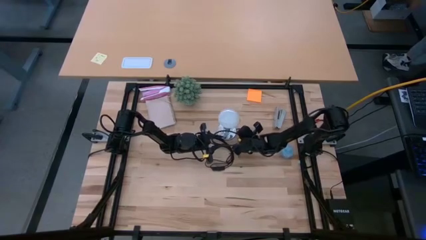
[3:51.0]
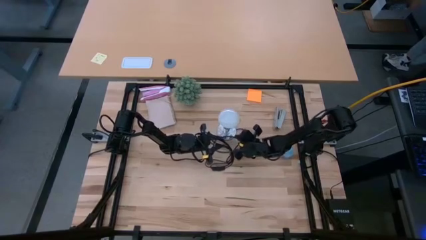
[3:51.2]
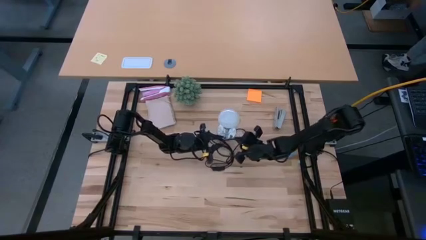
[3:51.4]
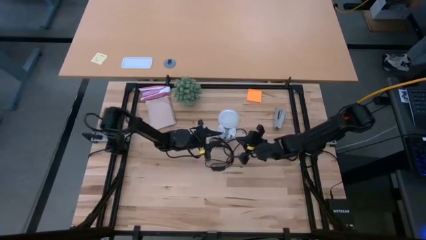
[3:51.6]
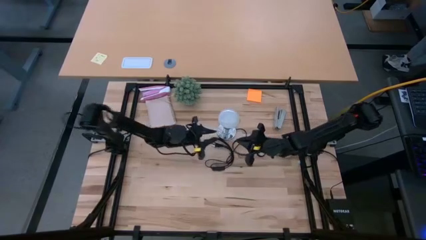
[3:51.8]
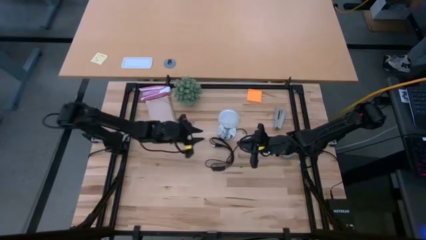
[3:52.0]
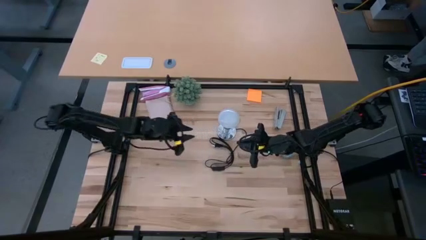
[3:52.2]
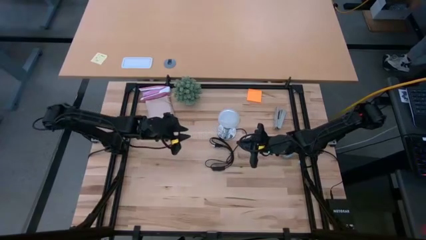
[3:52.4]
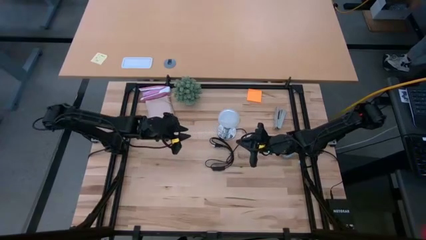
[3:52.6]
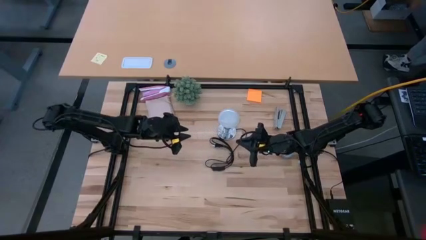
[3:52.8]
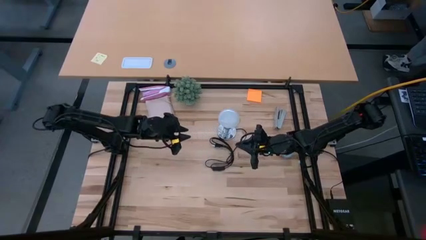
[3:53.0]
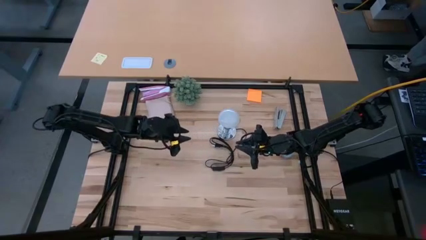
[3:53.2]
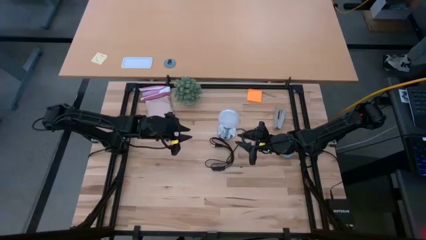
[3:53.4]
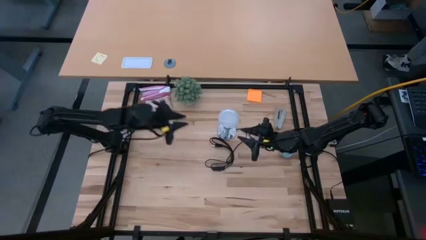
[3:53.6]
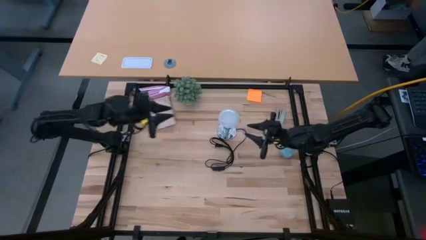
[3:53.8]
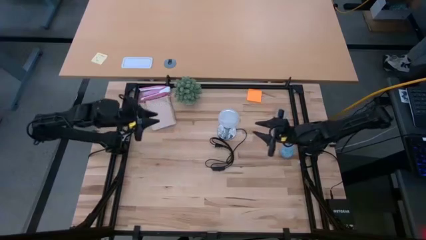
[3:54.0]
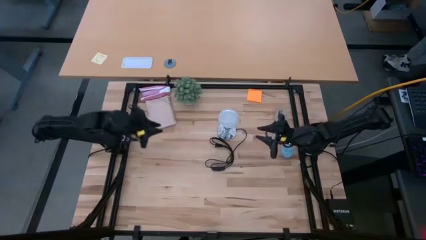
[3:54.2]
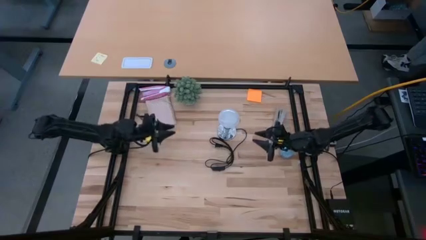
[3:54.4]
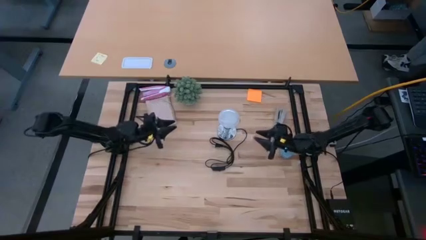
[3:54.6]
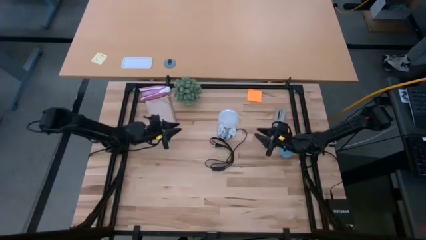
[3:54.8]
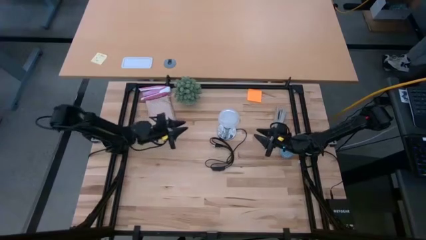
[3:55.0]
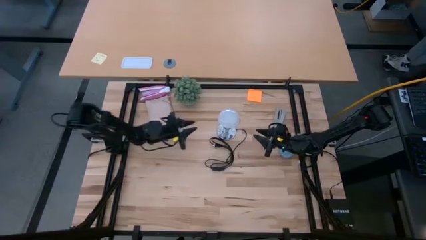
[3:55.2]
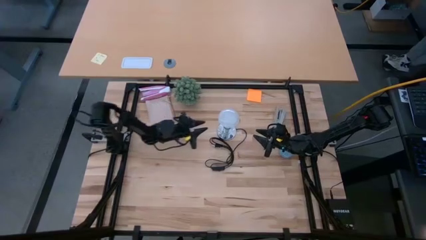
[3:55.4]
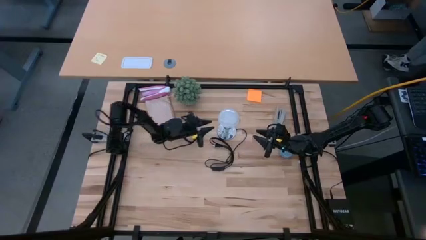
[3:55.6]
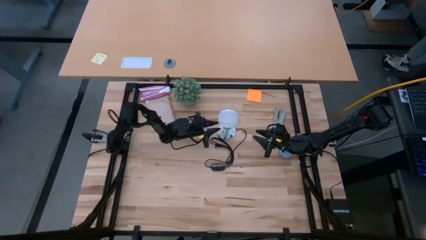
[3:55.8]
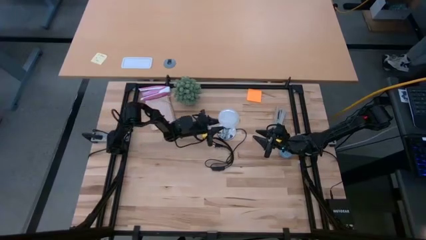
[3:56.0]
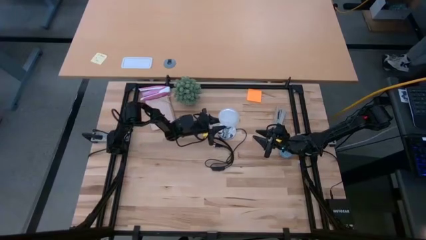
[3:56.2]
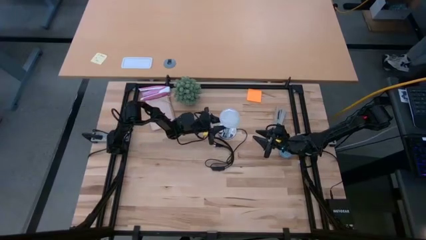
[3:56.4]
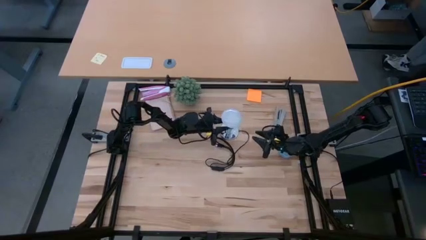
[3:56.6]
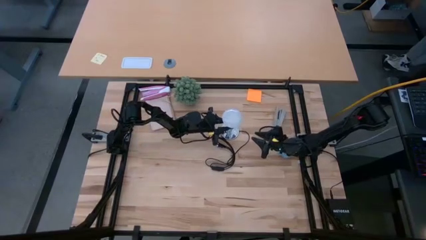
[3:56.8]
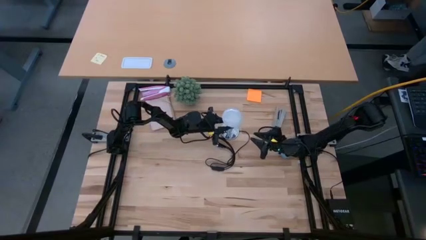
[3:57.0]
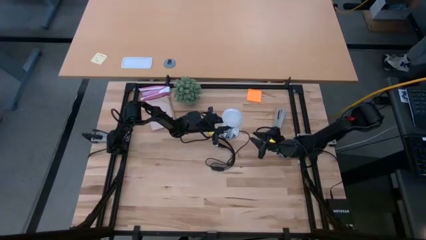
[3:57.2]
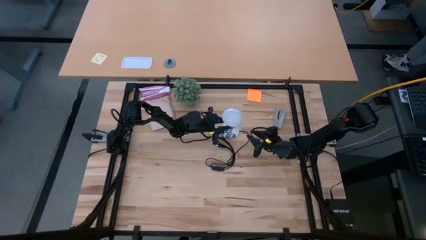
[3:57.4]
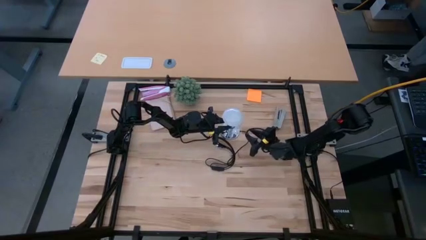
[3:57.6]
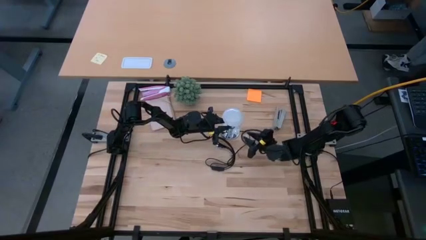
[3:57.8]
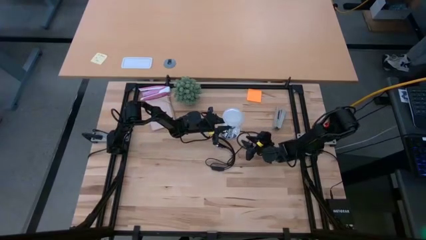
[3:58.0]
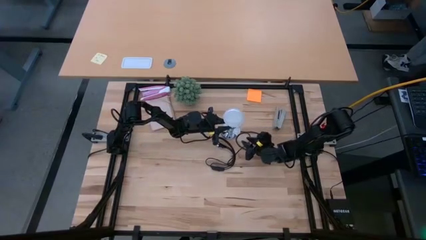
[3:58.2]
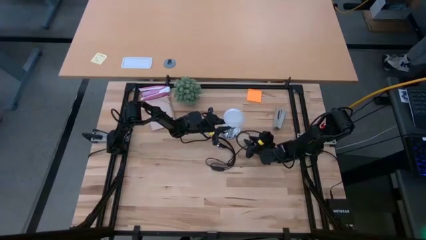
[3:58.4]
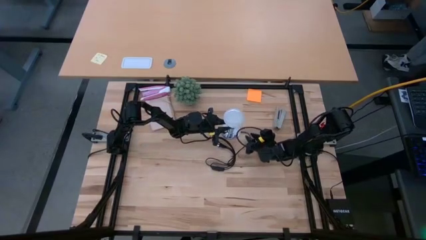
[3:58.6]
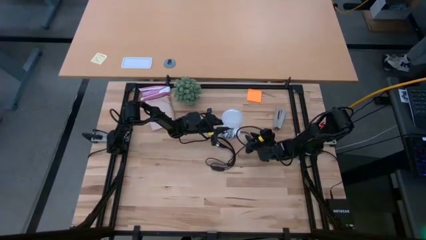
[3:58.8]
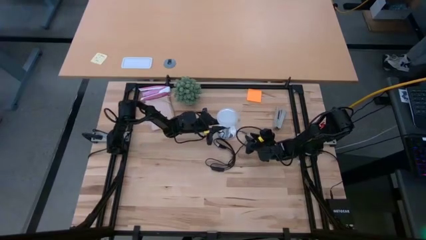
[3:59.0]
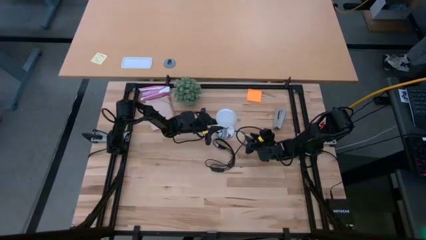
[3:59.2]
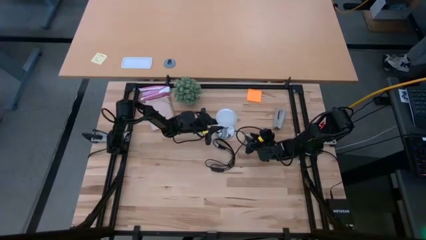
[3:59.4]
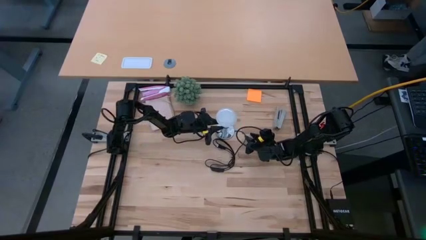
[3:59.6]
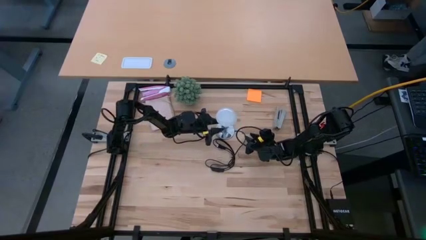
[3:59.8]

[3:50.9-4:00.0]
Task: Screw lightbulb
Remove the lightbulb from the lamp

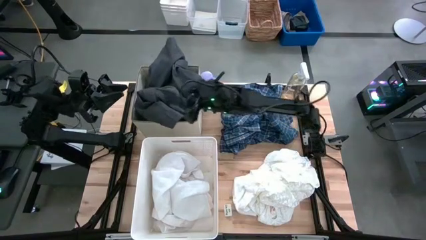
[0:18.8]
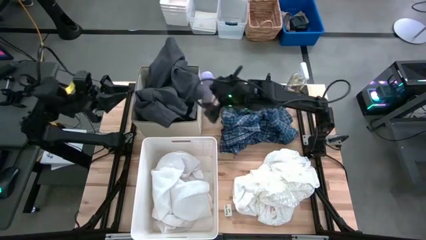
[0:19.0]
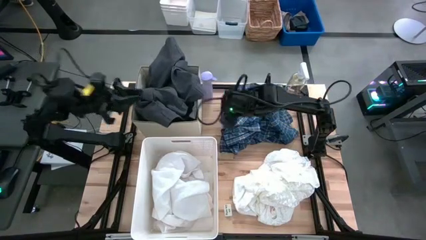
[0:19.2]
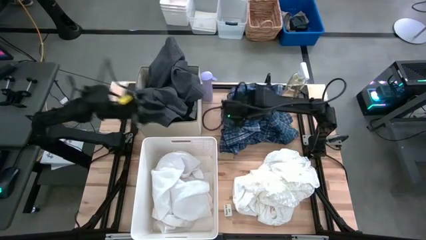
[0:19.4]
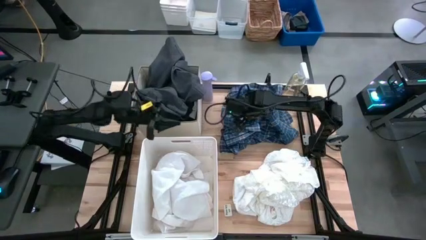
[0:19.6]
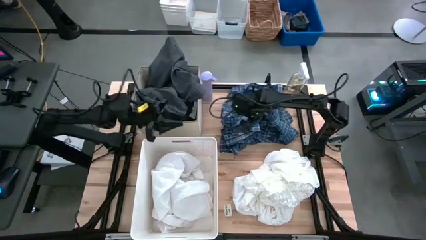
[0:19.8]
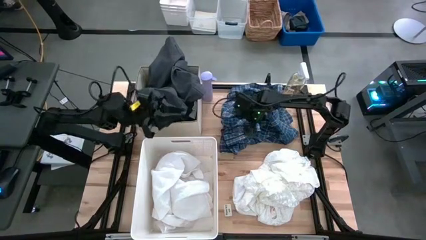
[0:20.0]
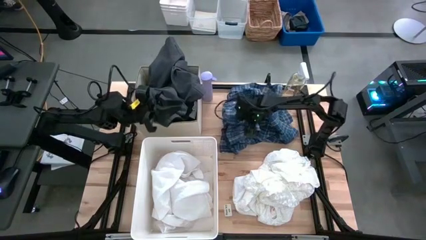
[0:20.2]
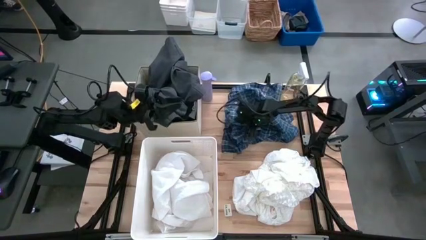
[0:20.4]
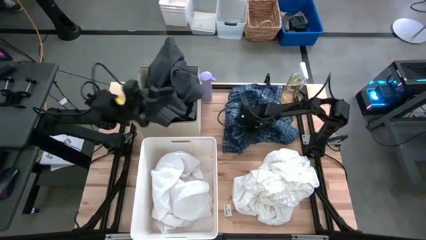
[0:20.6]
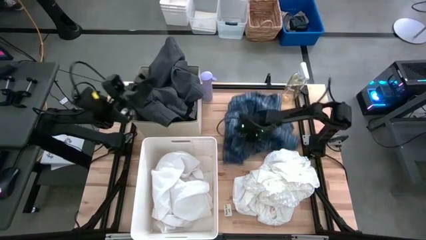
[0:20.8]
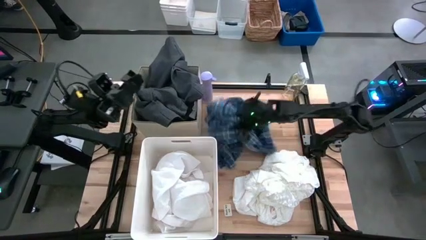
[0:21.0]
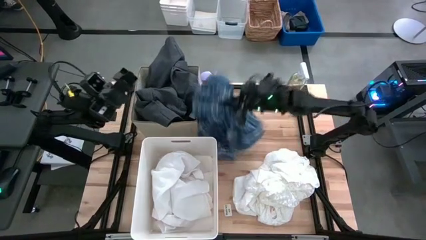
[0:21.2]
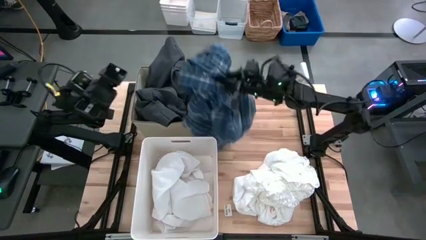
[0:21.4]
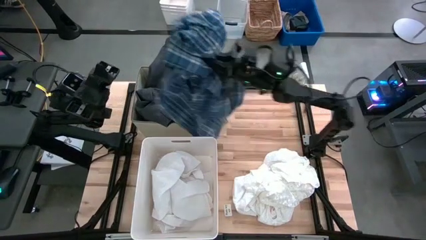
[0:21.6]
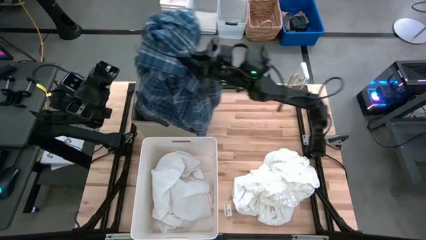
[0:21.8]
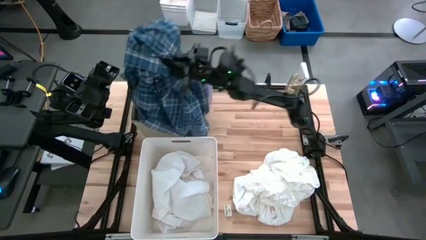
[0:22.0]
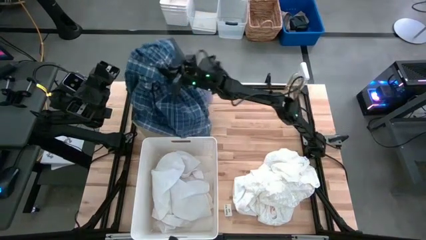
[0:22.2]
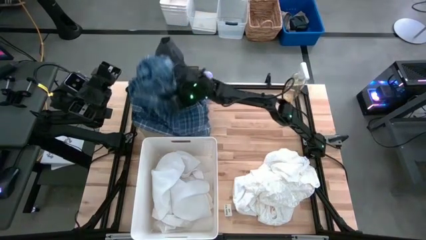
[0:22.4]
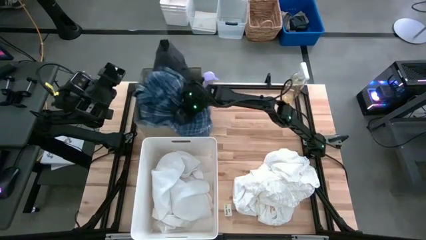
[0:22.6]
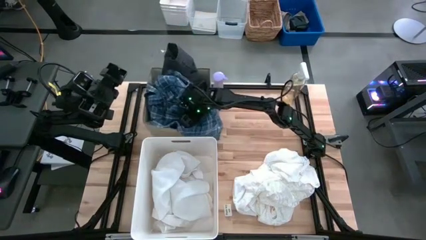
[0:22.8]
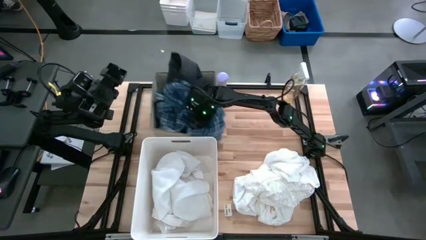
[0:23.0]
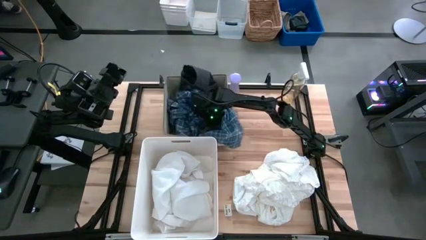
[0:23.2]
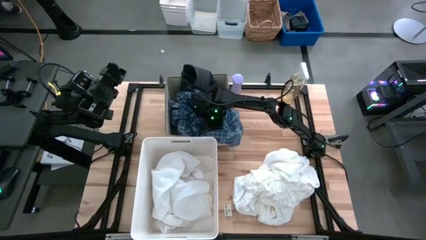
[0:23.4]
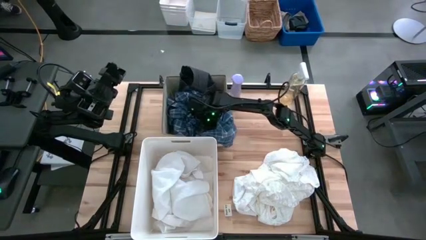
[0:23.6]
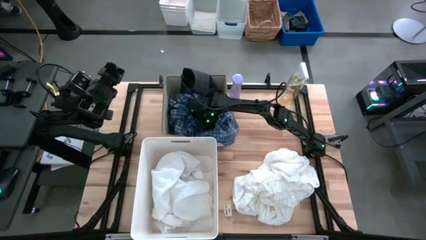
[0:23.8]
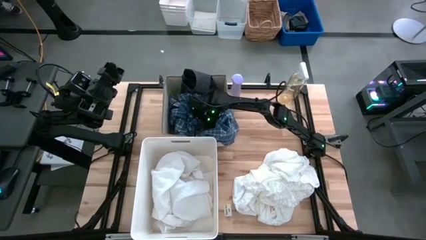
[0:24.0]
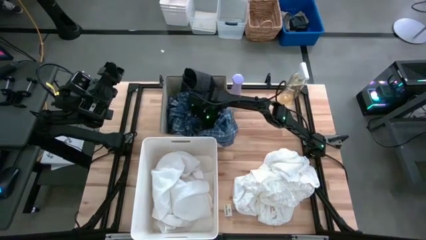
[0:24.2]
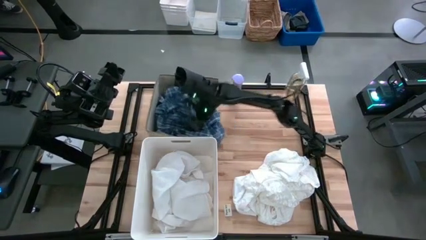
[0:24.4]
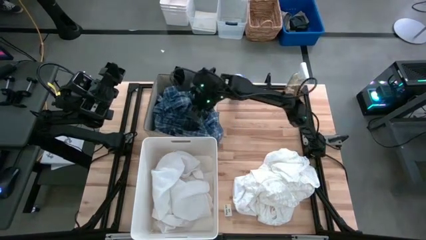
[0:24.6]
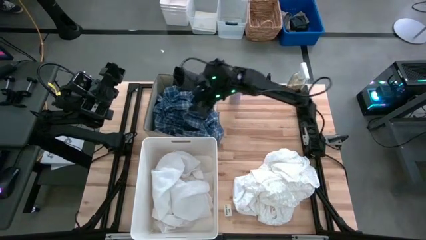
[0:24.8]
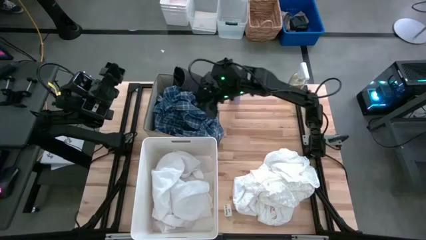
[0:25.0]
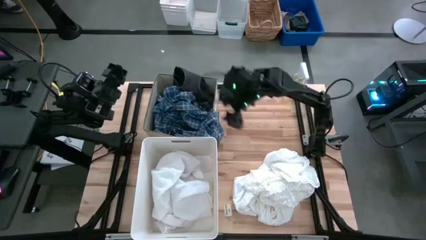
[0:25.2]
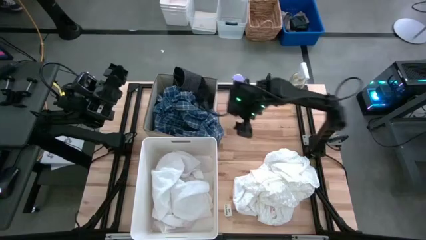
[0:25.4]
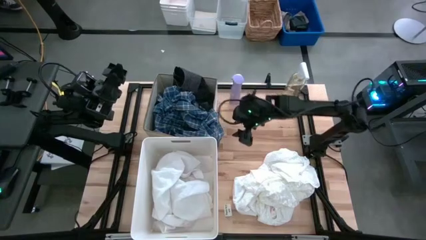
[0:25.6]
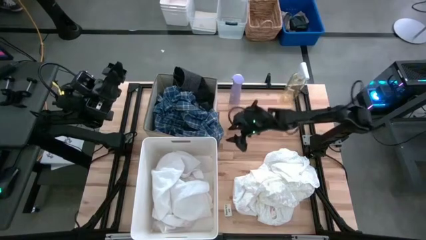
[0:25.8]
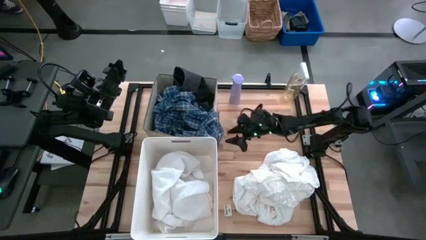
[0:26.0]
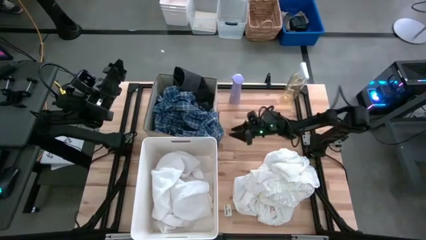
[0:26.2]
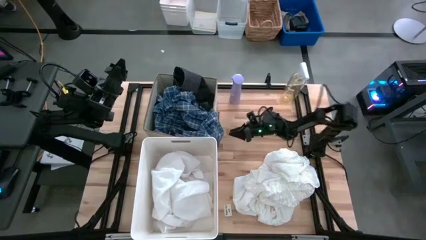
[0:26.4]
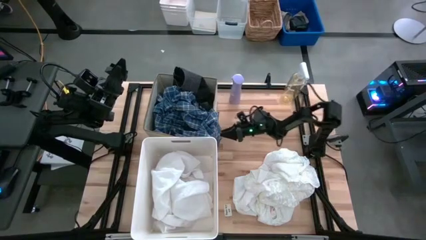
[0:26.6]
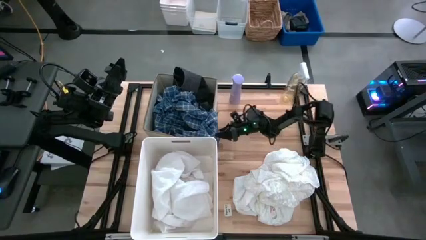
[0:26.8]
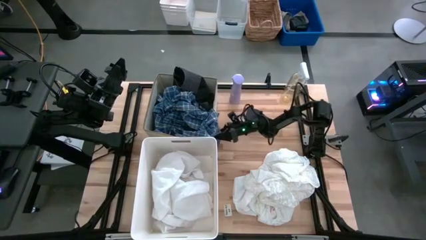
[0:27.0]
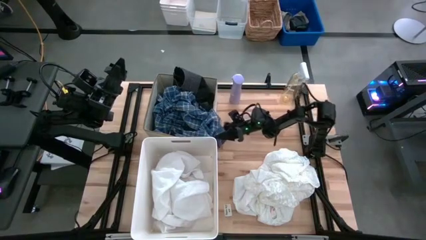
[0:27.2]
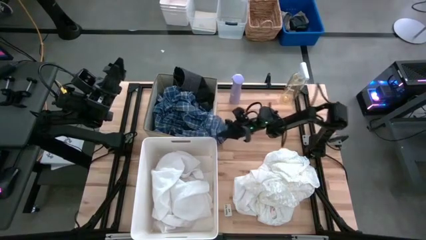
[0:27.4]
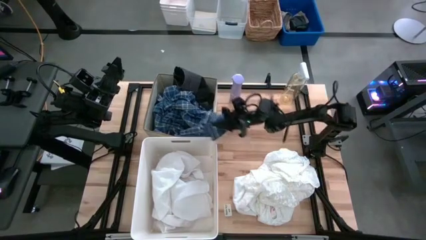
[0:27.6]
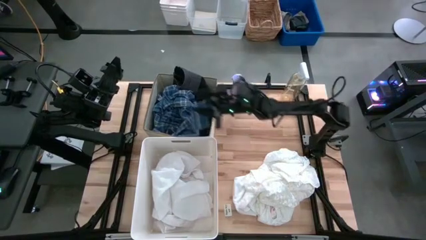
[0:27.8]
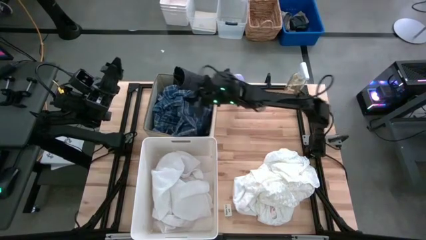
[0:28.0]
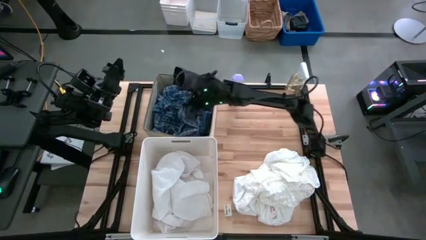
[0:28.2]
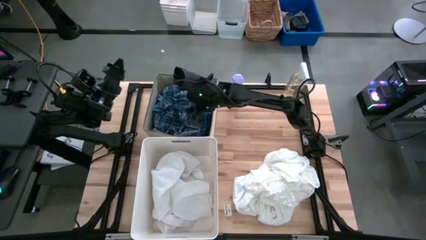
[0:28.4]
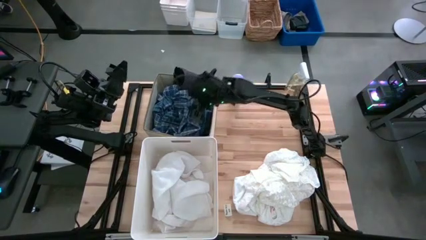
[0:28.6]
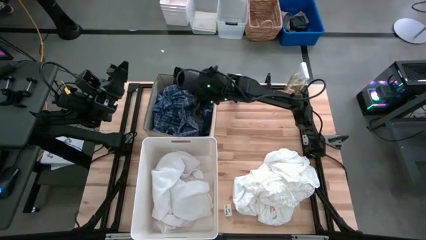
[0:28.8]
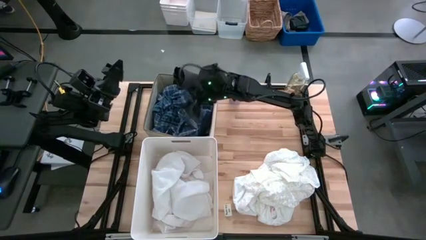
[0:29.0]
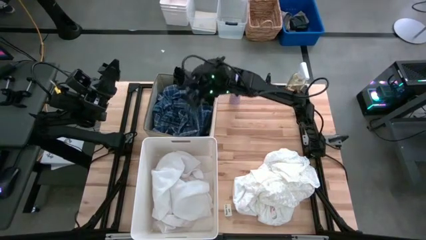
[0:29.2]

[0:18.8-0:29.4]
Task: Sort clothes
Put the blue checkered shirt into the top white laundry organizer
